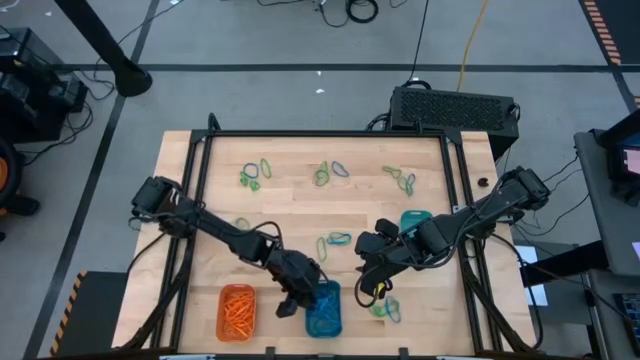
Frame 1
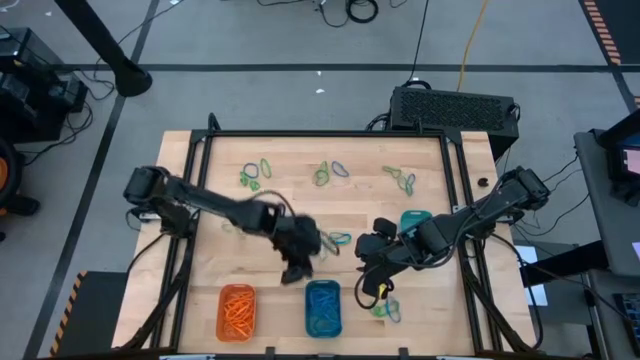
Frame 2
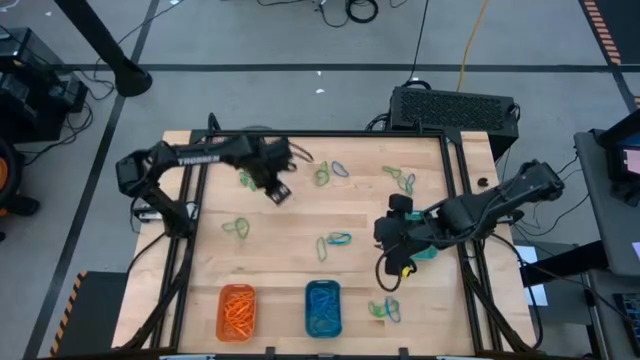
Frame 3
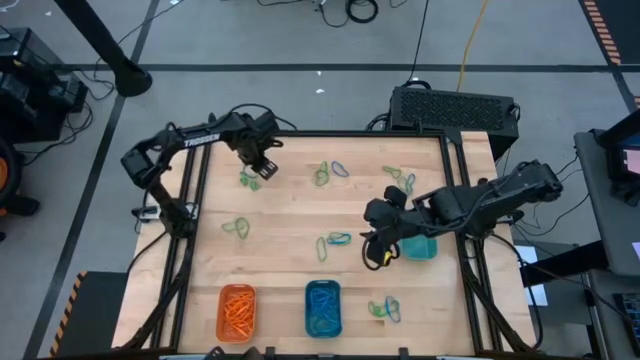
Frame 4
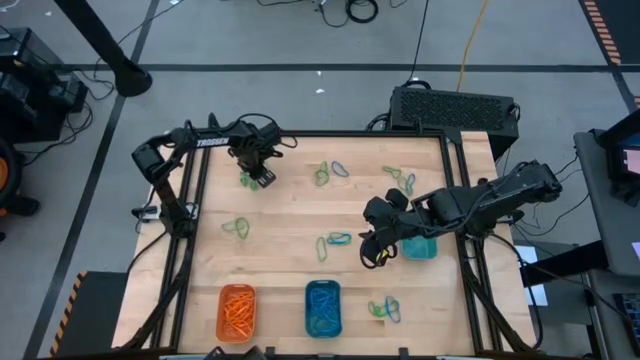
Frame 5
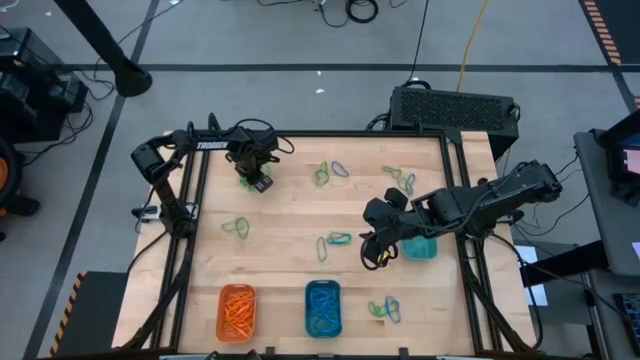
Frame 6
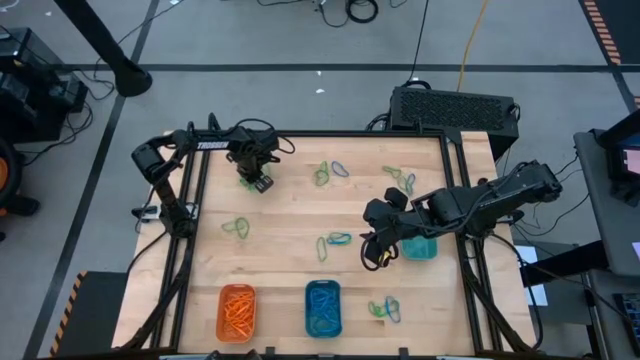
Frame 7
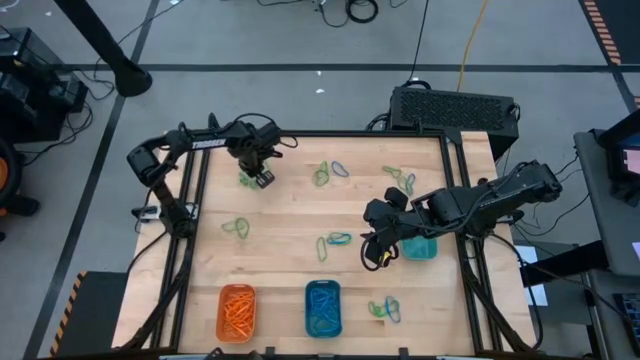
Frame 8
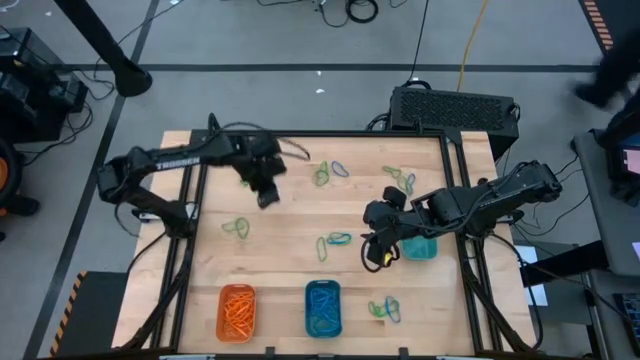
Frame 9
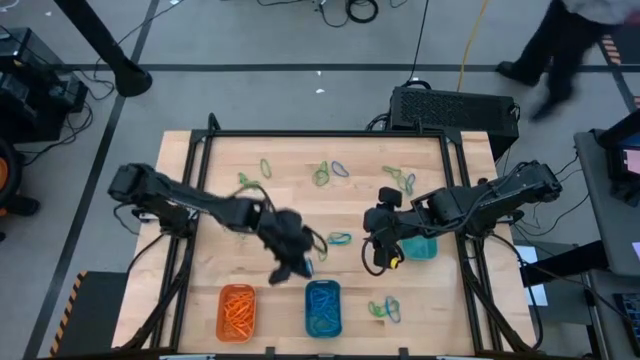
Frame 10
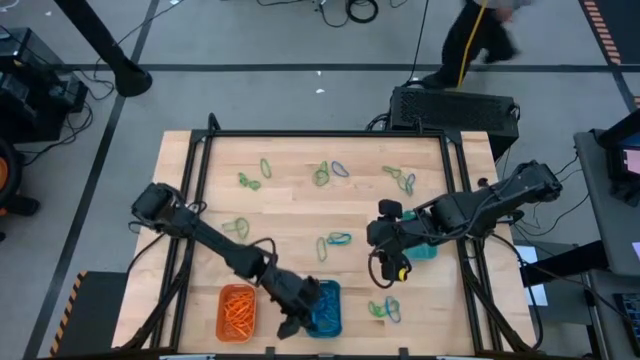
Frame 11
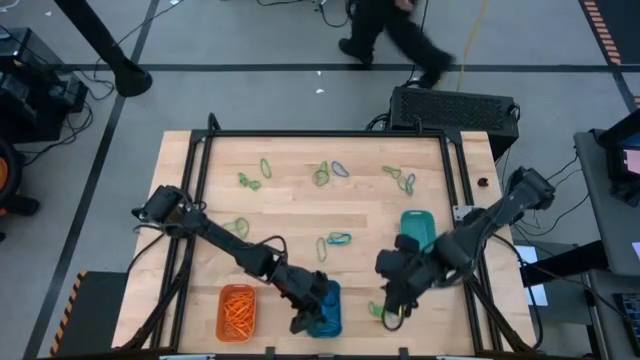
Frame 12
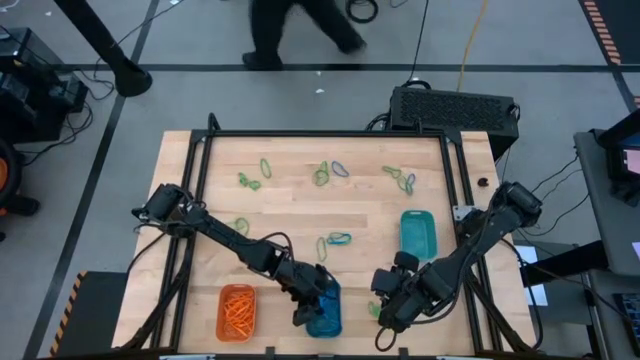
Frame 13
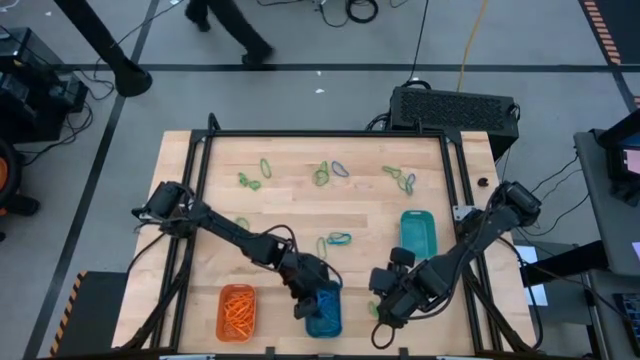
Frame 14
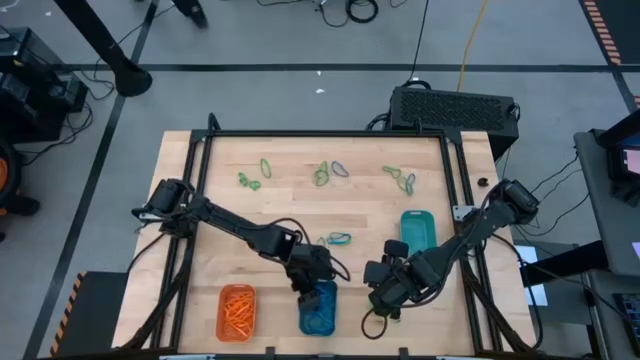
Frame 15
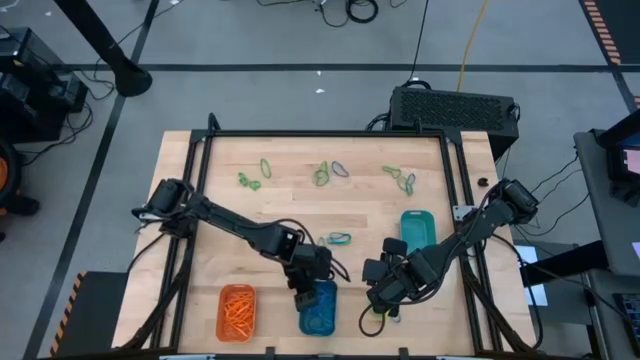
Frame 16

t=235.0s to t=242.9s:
Task: Sort rubber bands into baskets
Put the blue rubber band into the blue bin

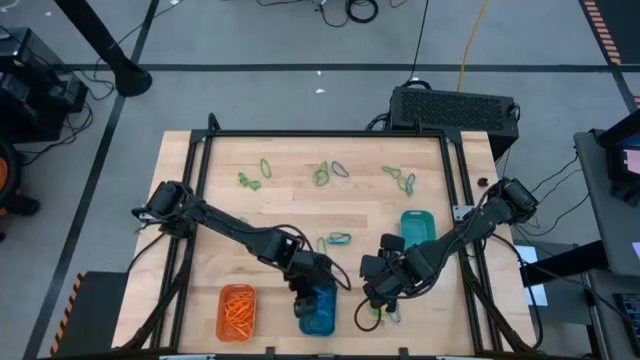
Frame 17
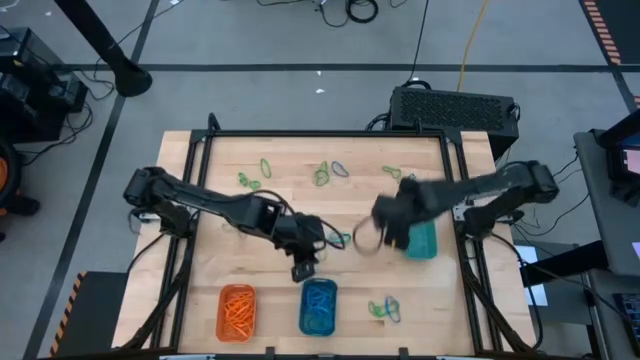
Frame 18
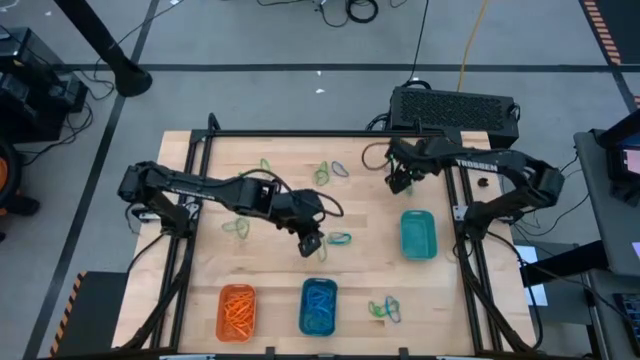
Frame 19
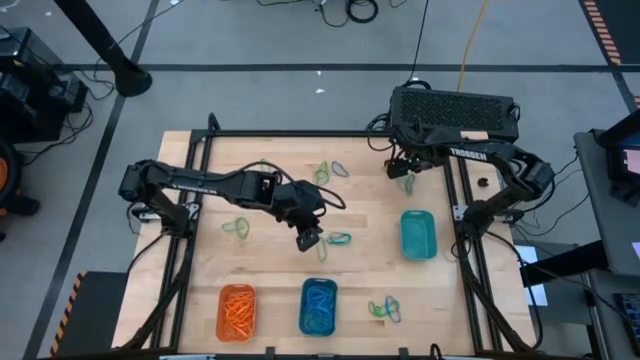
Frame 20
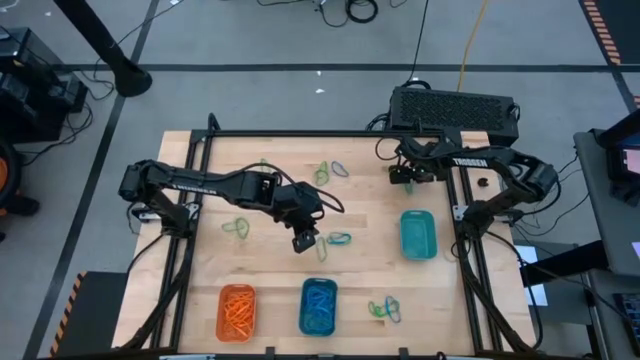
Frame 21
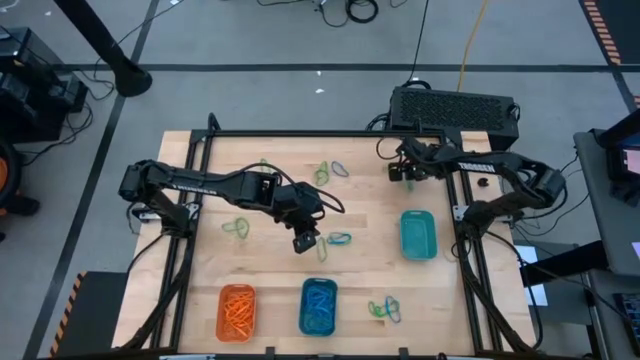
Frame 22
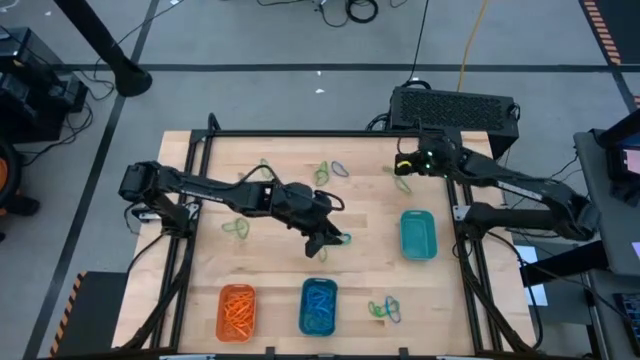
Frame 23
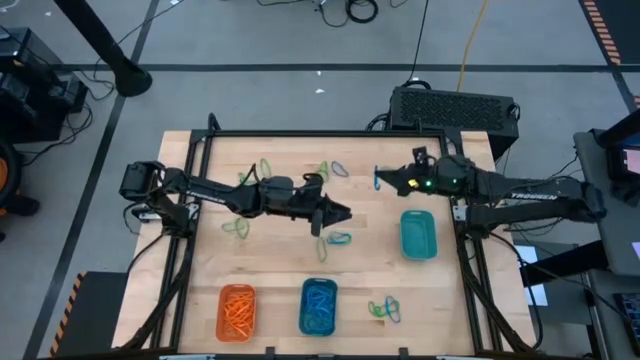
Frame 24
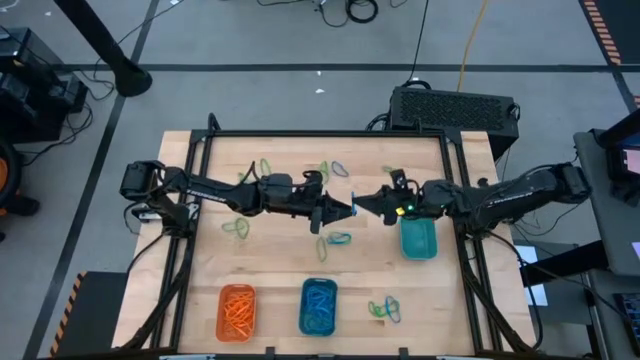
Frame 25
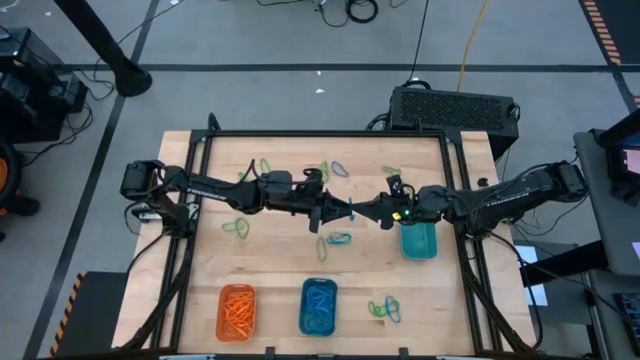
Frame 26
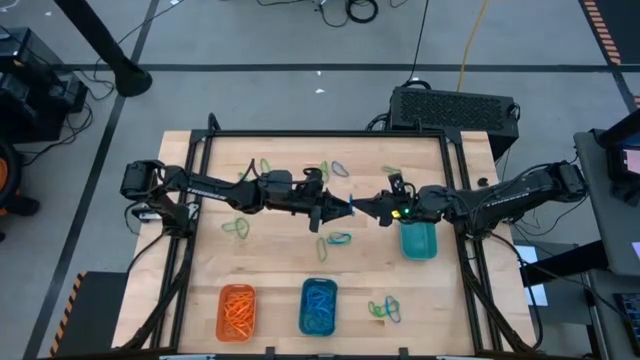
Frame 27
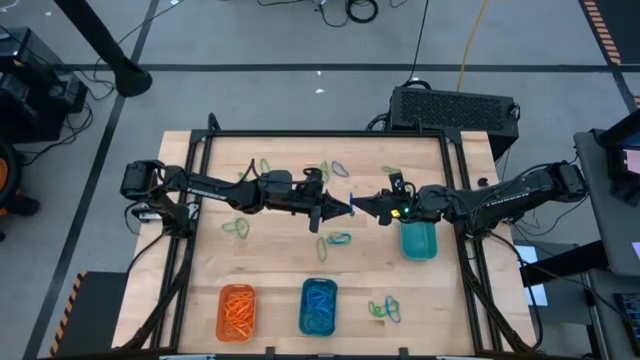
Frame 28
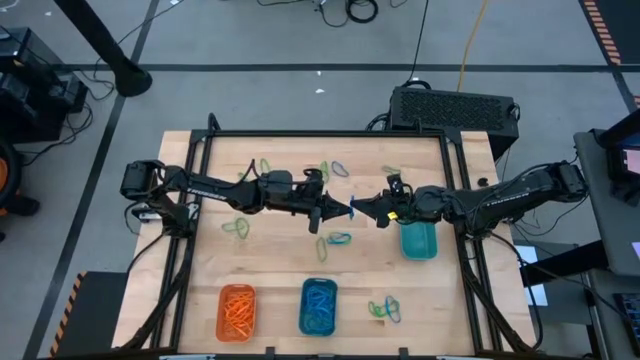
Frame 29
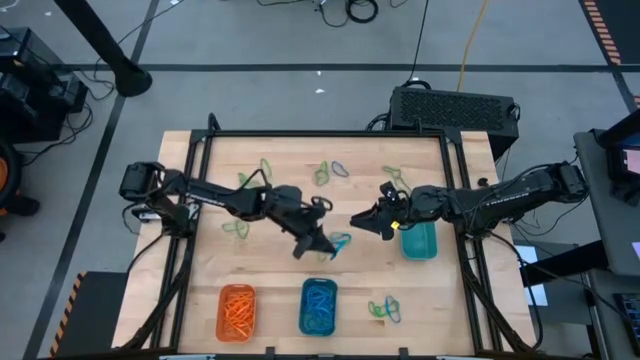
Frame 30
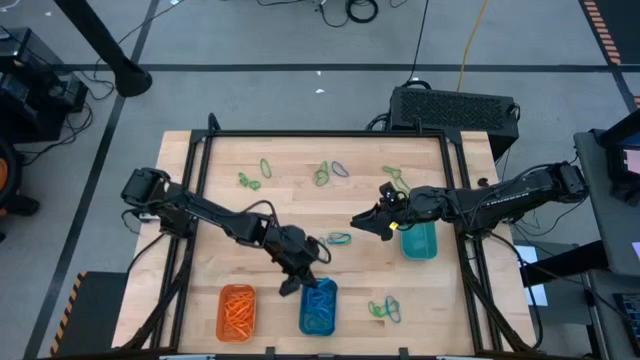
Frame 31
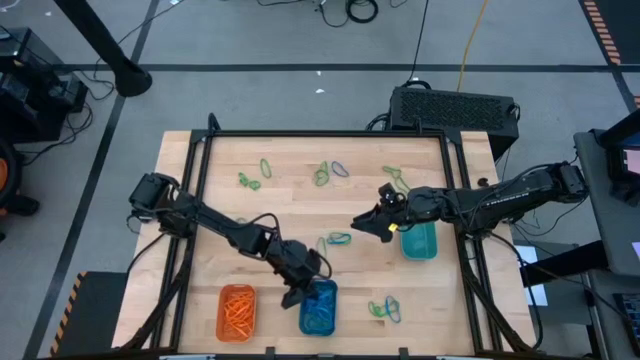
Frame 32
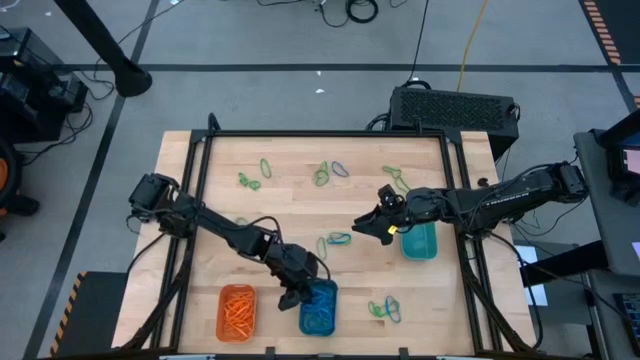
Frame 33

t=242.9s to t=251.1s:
Put the blue rubber band into the blue bin

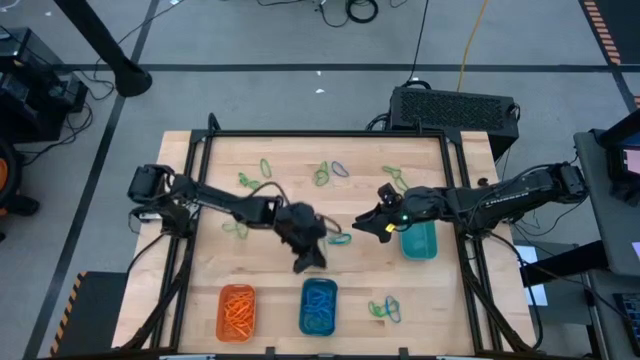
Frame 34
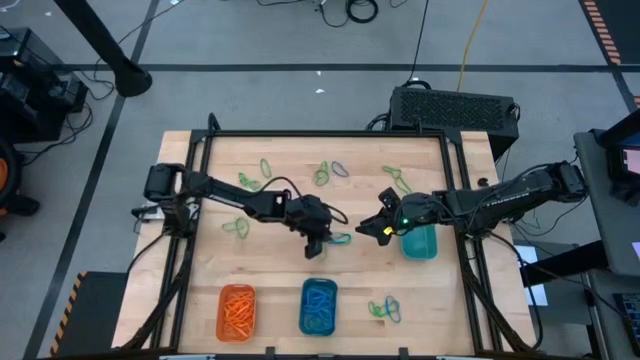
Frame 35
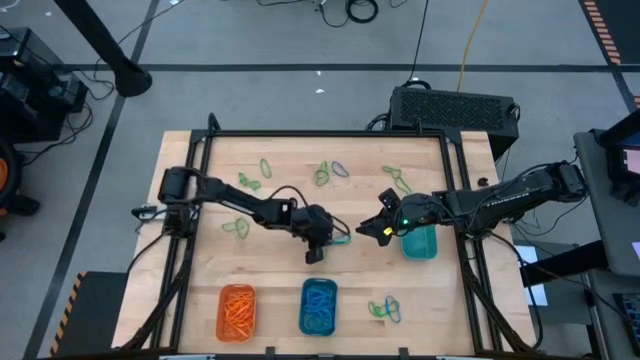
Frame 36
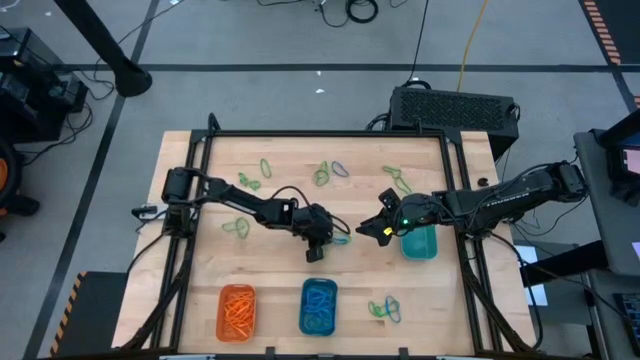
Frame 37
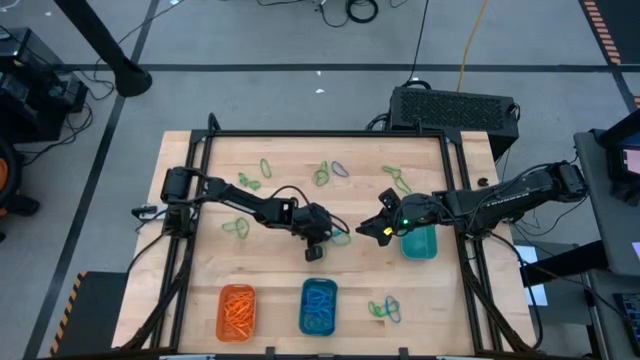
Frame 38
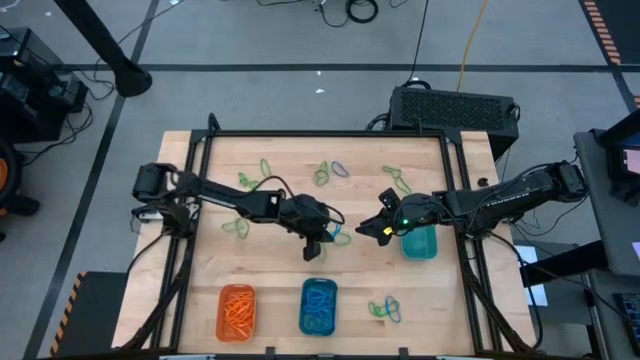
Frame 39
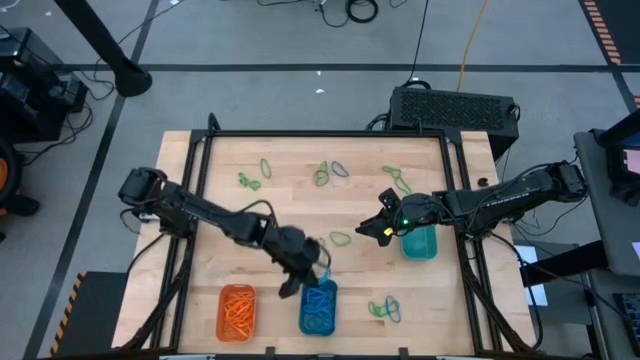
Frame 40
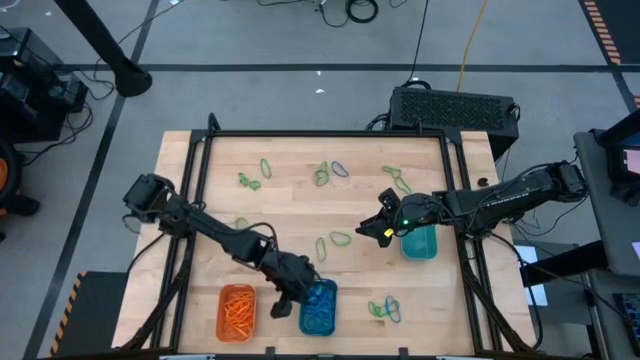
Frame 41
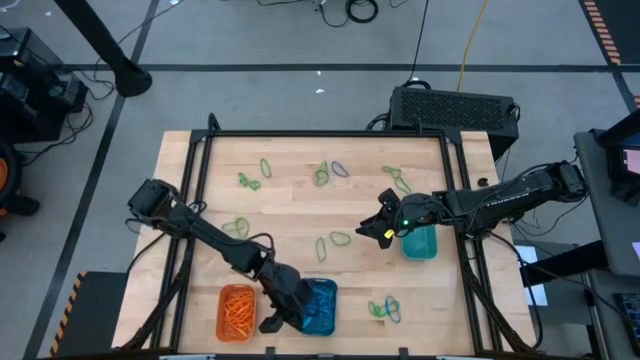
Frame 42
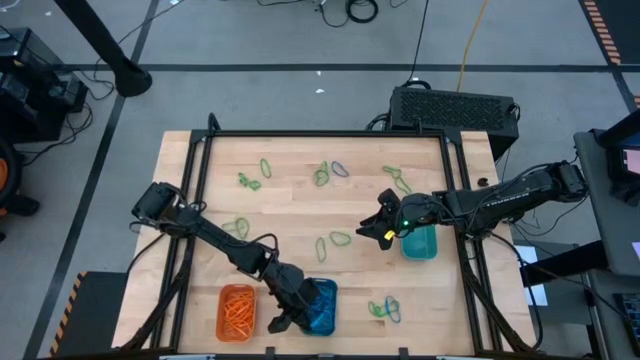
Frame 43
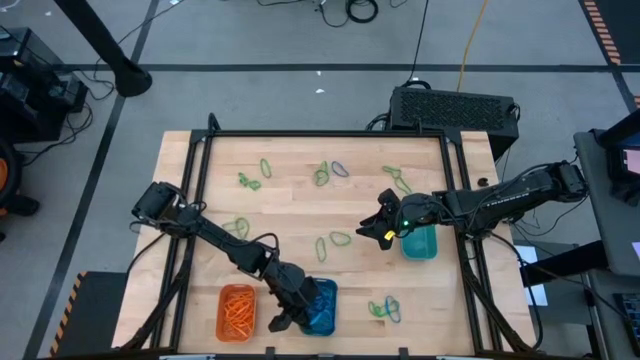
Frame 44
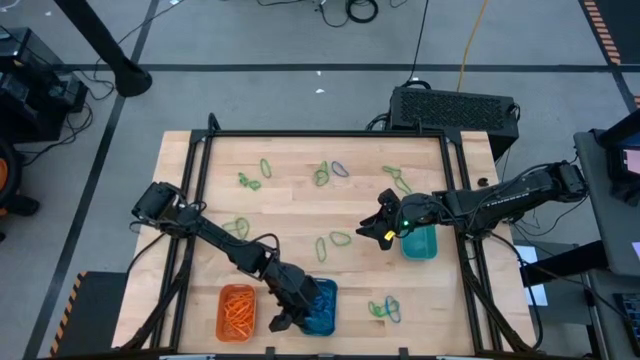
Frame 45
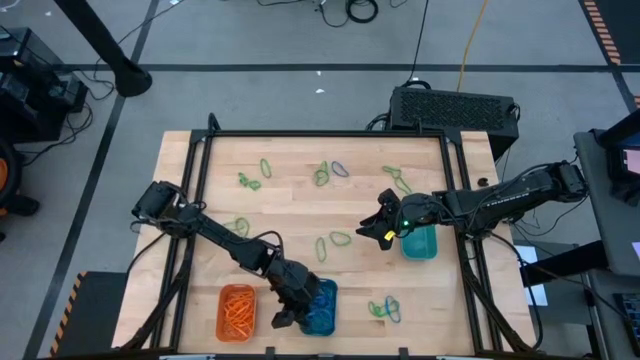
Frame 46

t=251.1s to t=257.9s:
Put the blue rubber band into the blue bin
